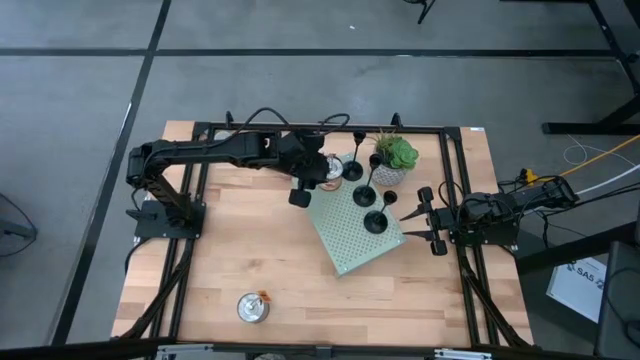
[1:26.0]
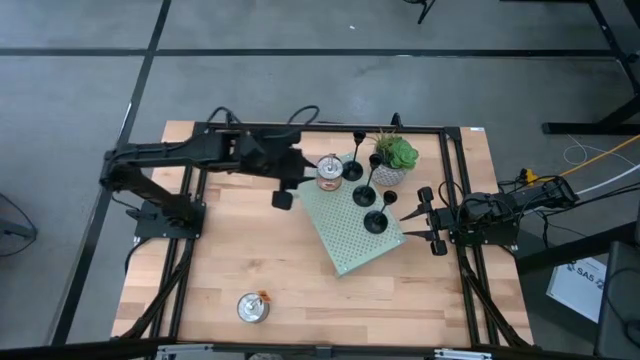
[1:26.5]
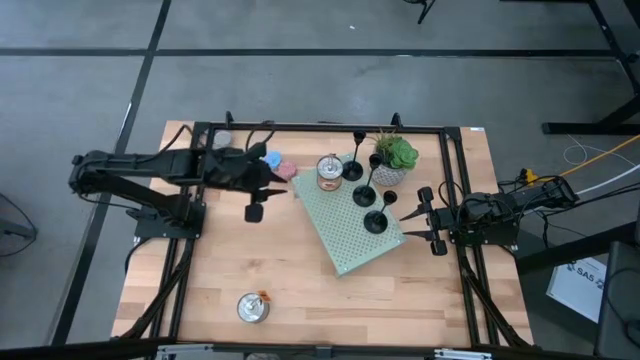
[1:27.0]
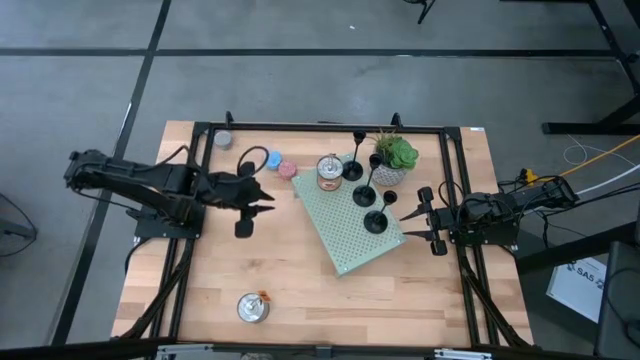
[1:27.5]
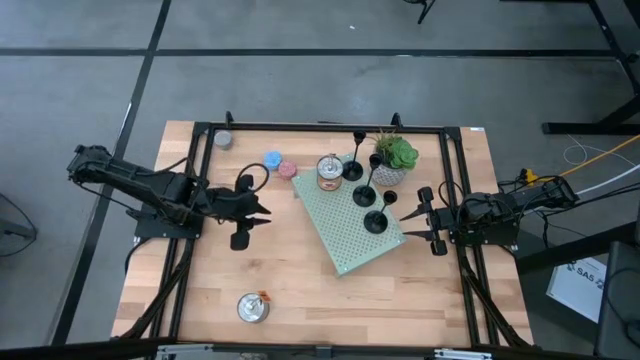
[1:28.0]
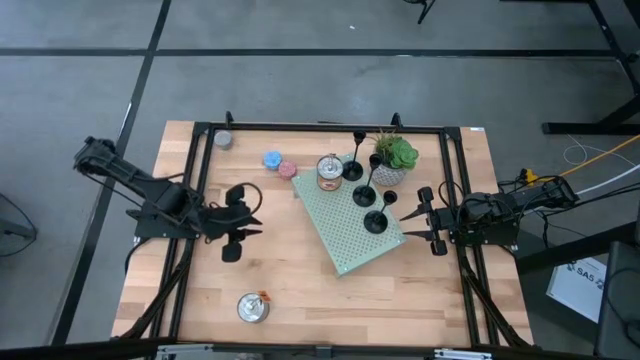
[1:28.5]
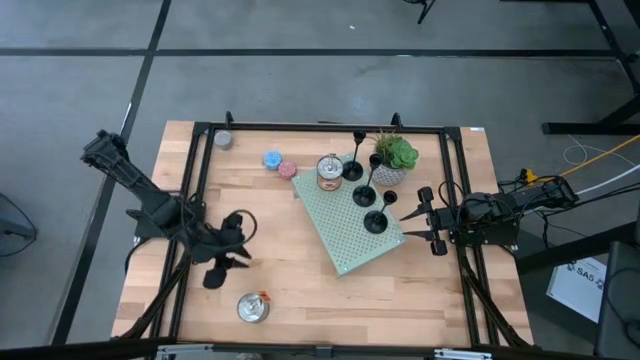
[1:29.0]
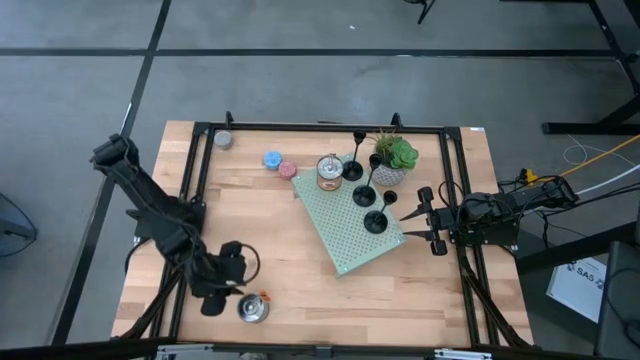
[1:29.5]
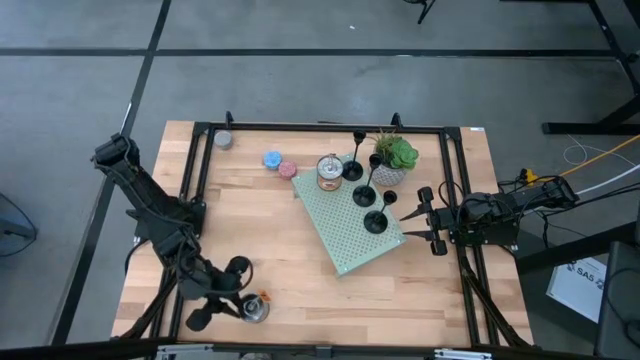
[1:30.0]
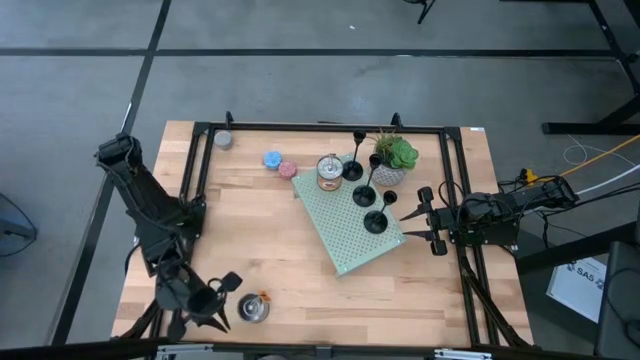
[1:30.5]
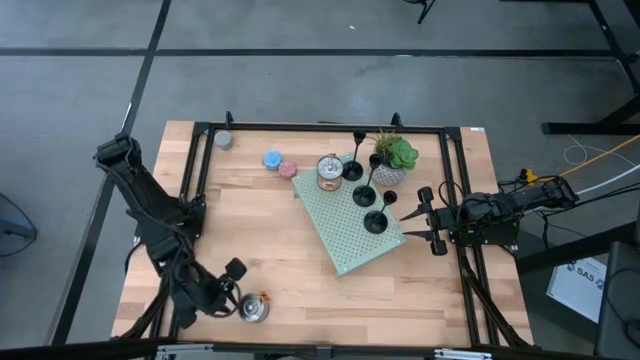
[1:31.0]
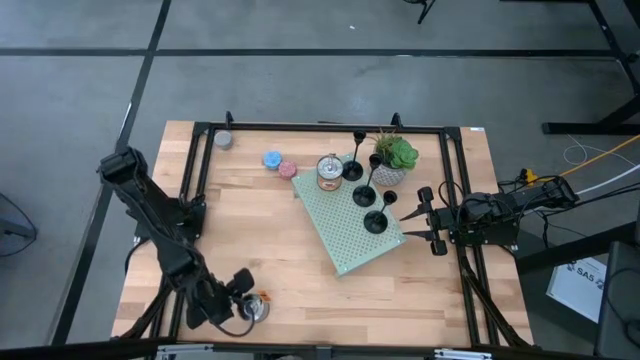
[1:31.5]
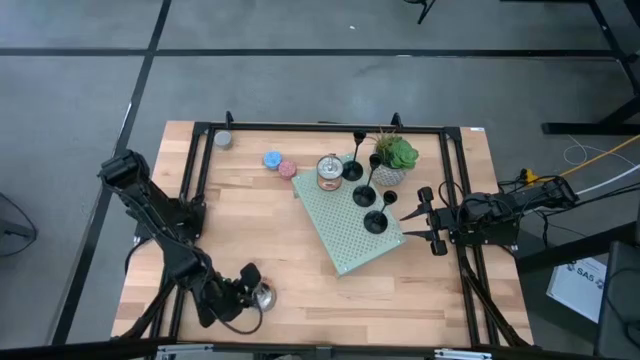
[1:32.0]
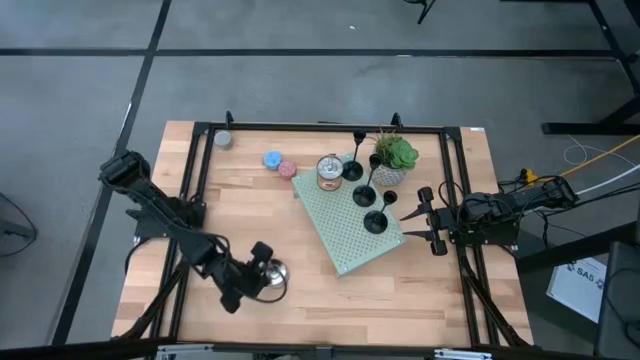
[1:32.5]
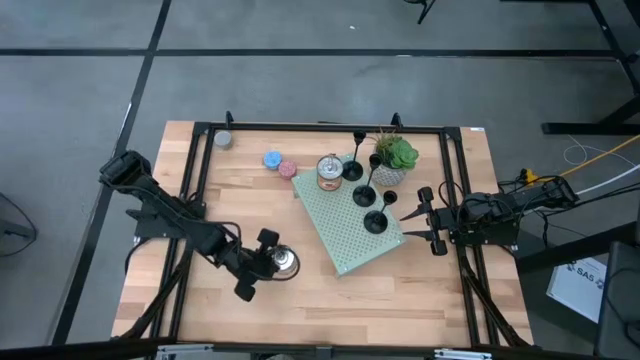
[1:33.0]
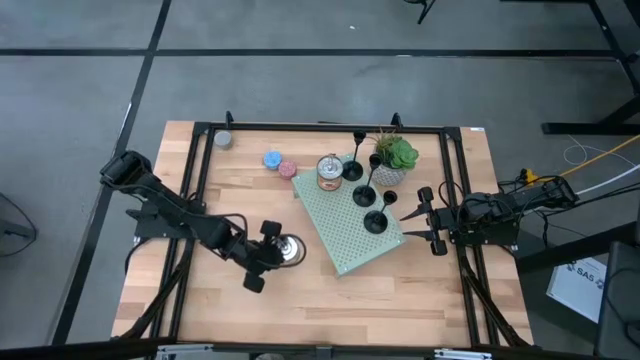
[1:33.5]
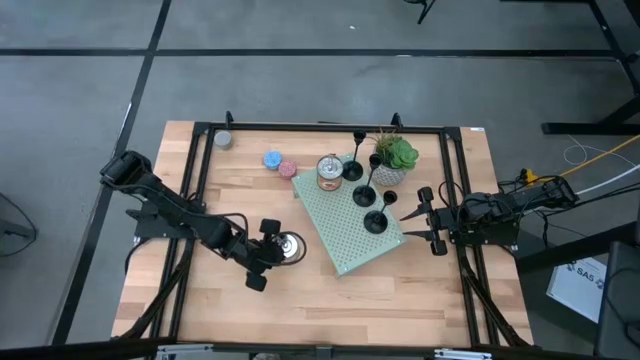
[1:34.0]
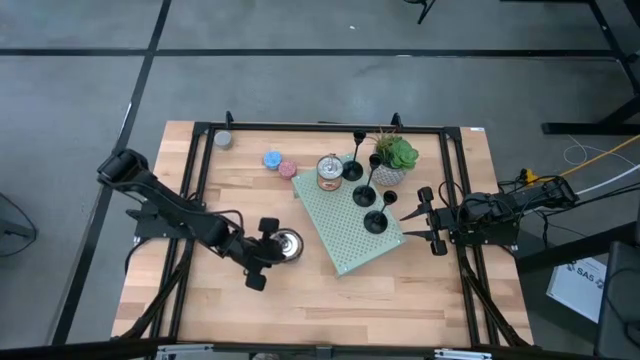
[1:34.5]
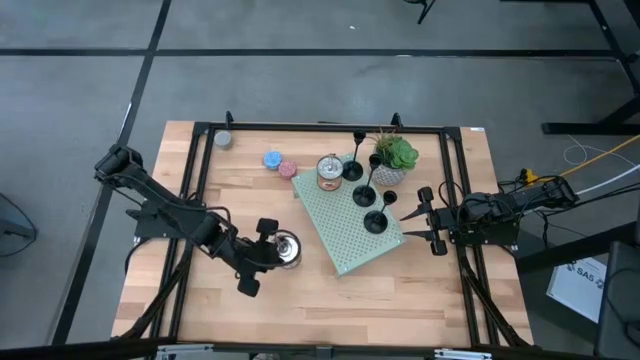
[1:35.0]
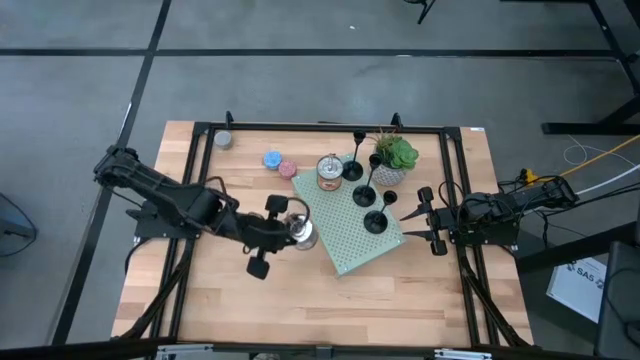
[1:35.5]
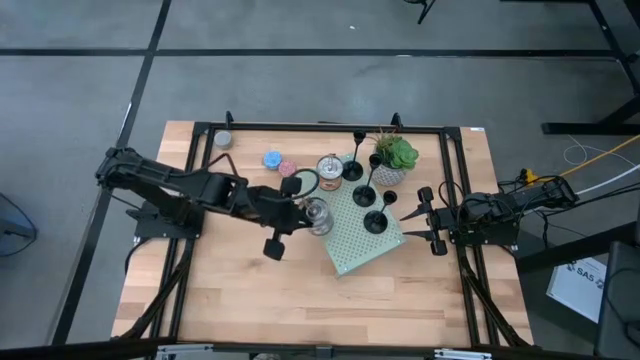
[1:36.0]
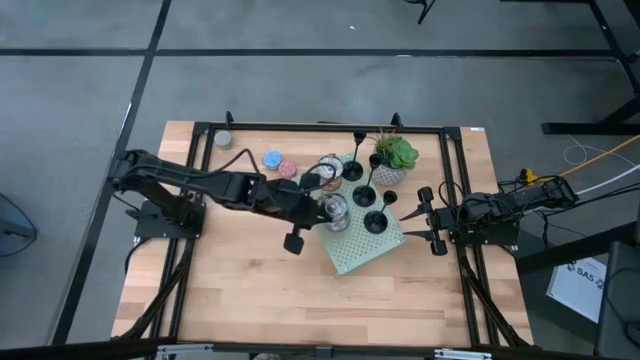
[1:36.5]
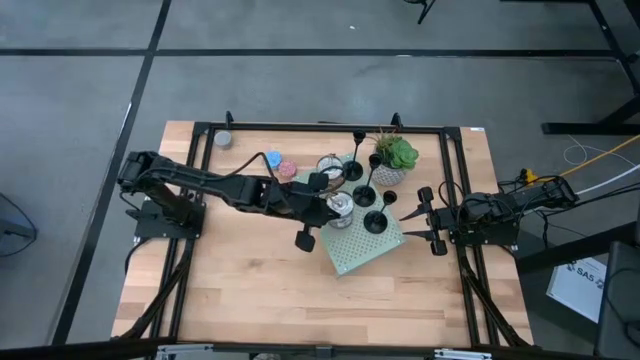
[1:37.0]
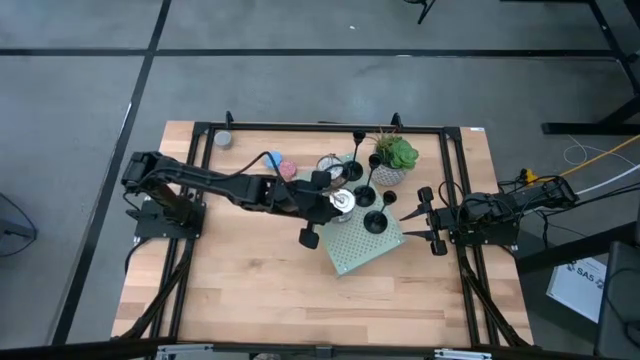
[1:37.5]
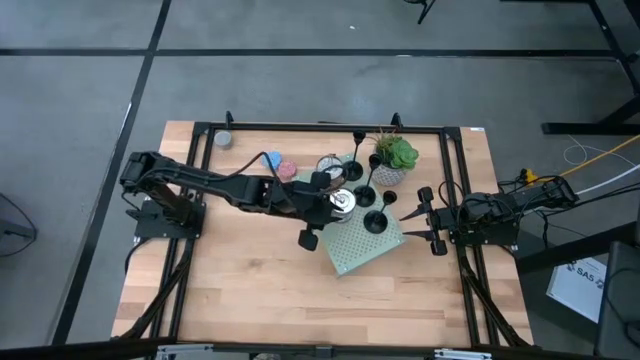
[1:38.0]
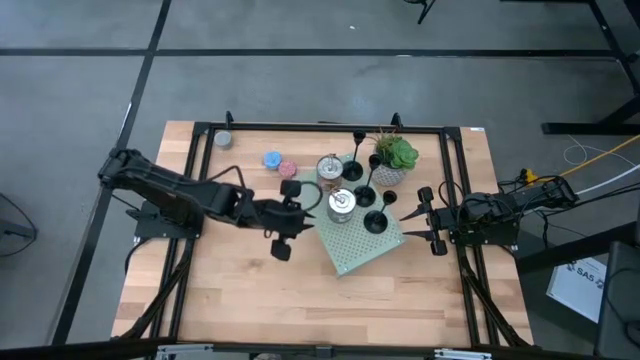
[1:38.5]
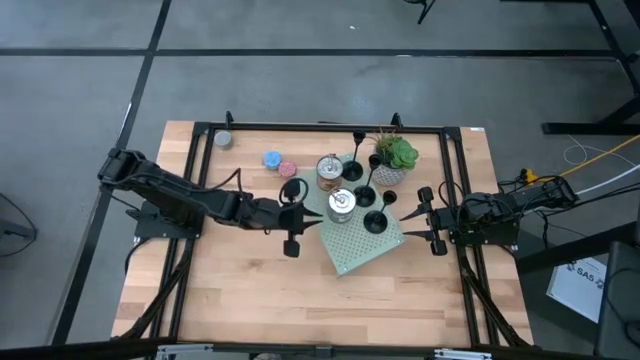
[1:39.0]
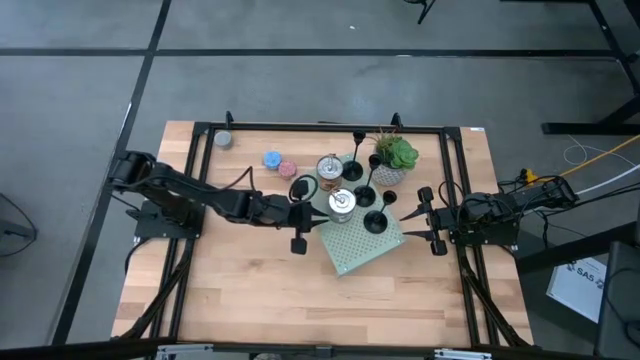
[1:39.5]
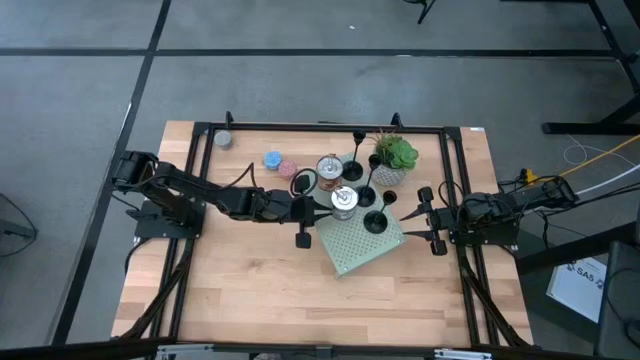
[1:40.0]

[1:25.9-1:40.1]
Task: Pick & Place candle stick holders
Put the brown canned scented candle on the shelf aligned with the other canned scented candle

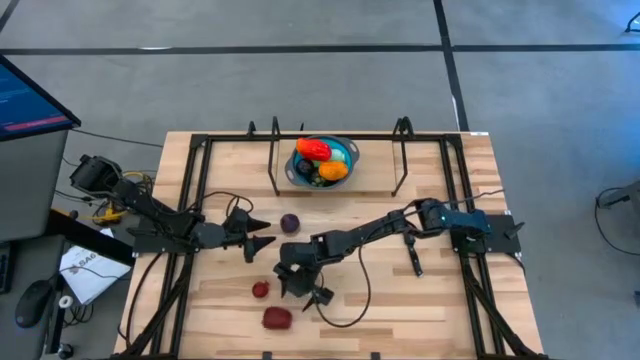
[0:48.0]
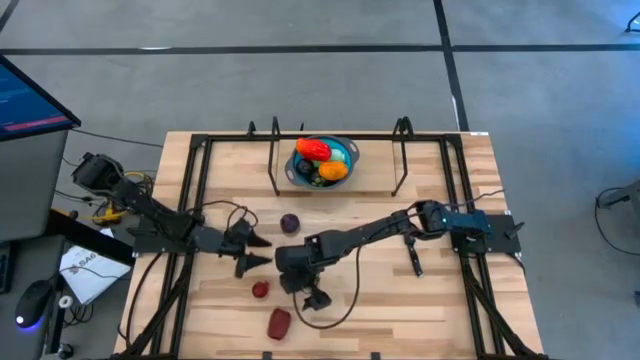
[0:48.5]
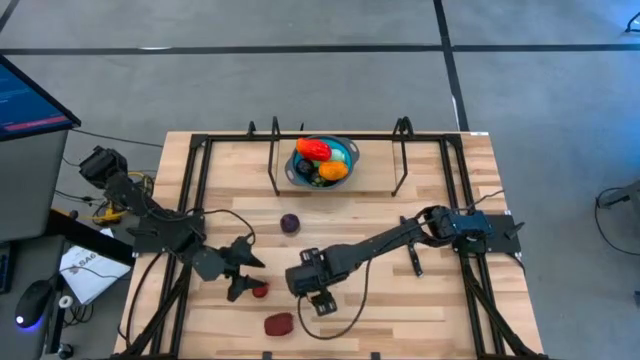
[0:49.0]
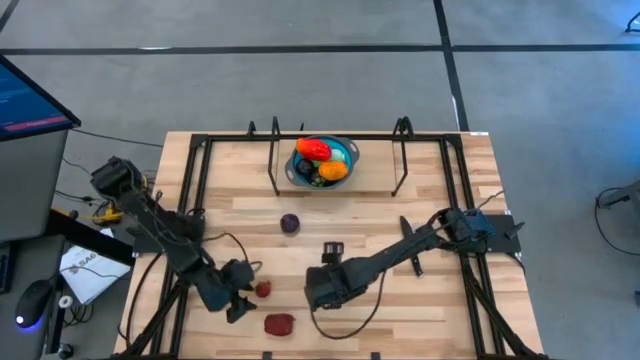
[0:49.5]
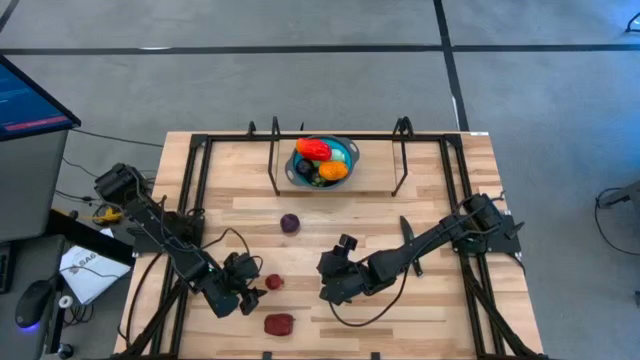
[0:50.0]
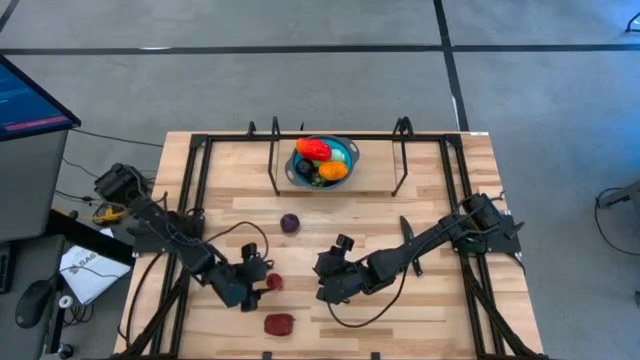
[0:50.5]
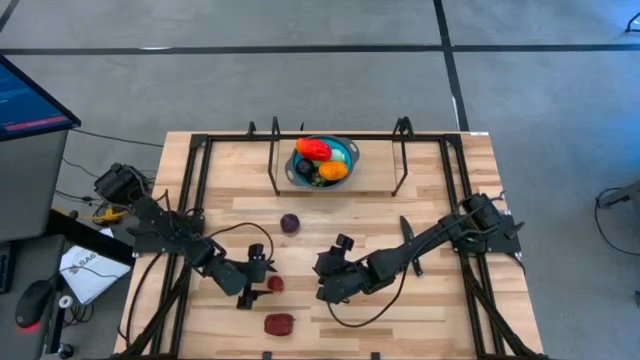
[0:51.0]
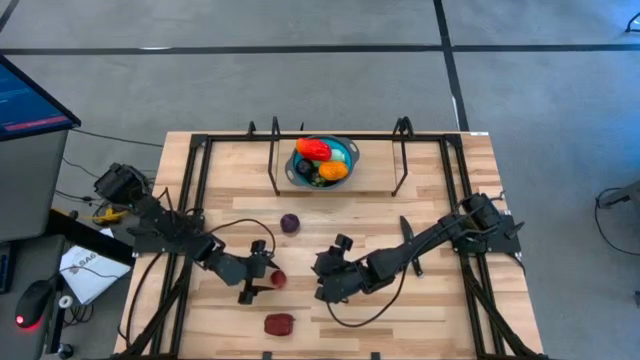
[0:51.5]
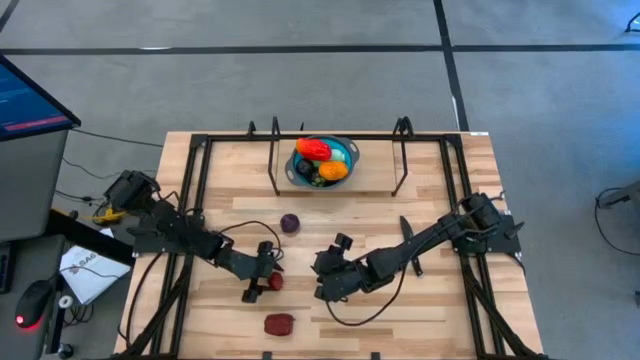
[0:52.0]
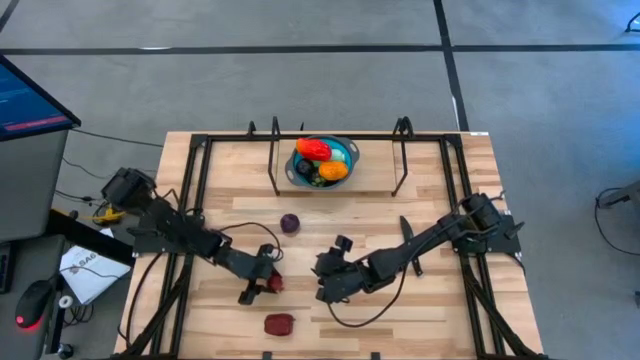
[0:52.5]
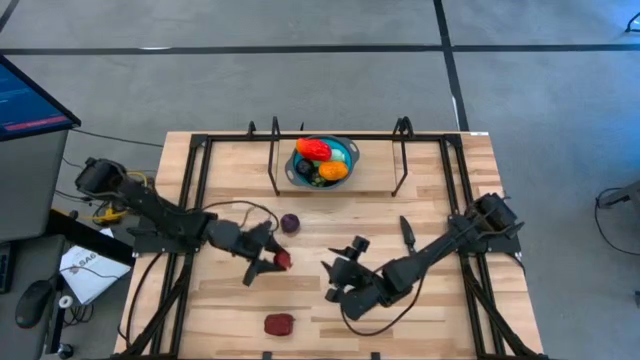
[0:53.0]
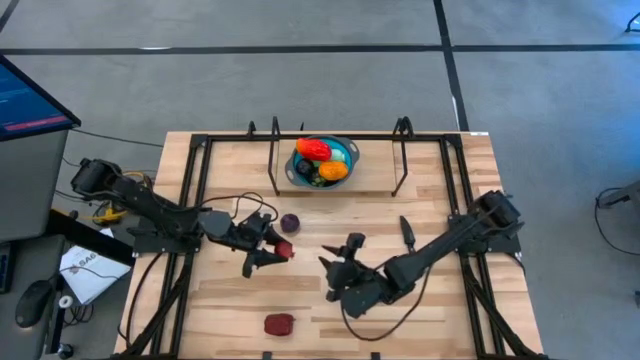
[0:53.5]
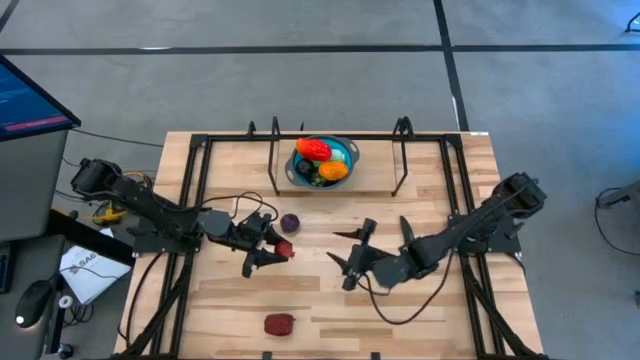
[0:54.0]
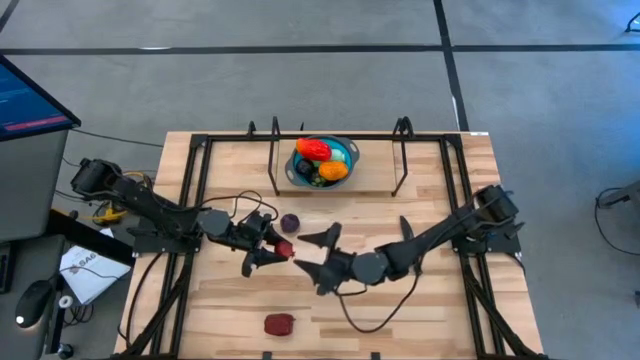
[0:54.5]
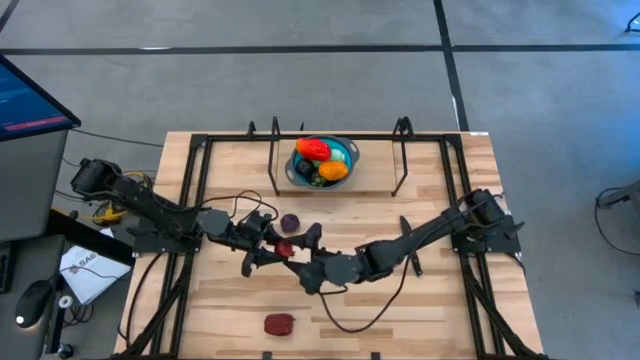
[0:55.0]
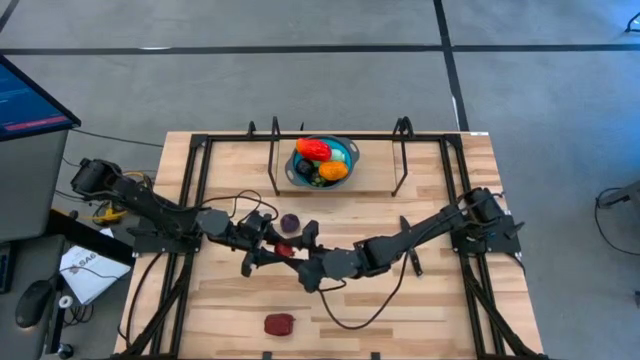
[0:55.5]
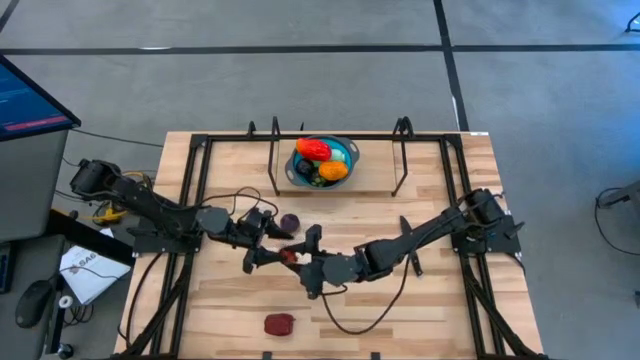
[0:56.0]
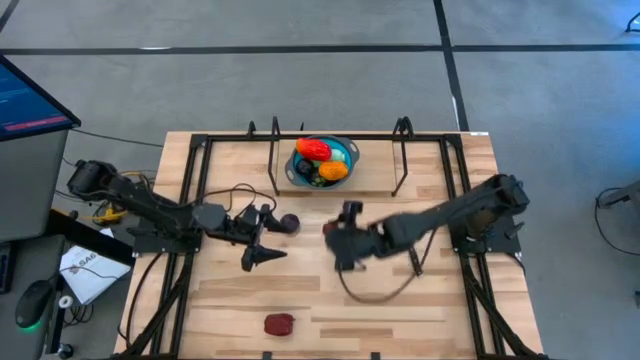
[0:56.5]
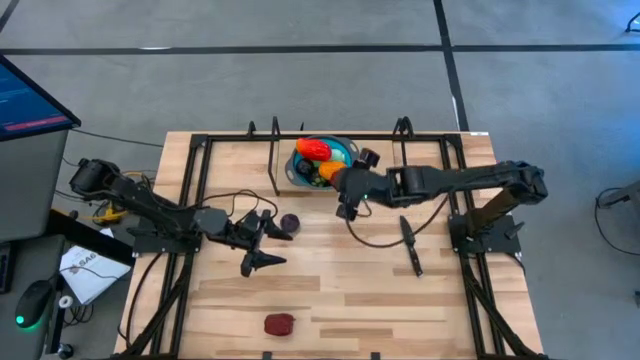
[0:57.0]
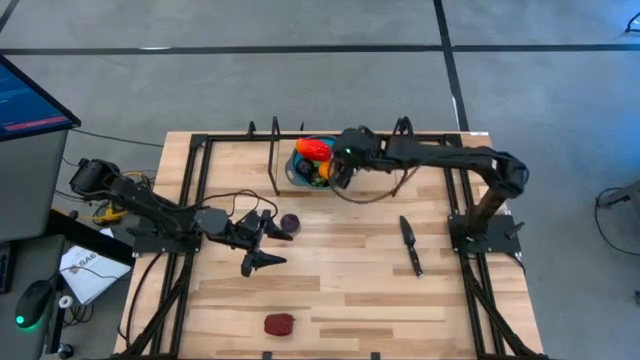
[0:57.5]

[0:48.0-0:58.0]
Task: Pick & Place Fruit
Put the red pomegranate into the blue strainer bowl on the shelf
